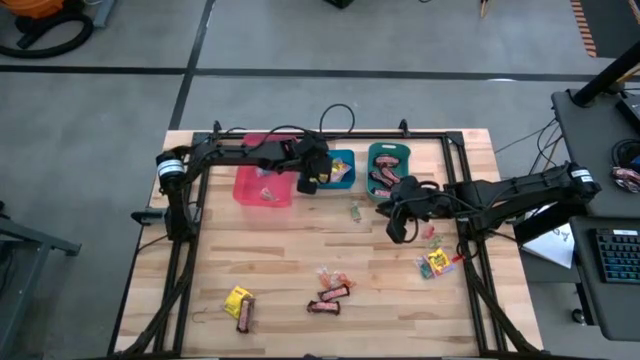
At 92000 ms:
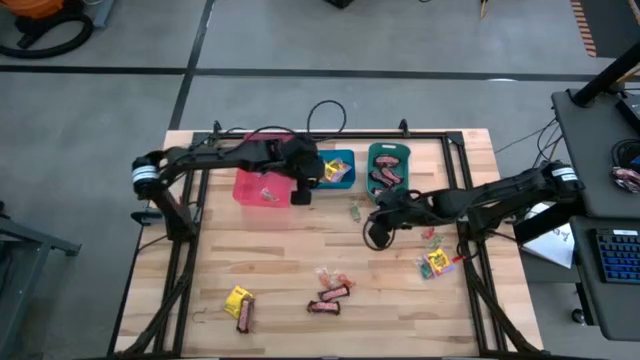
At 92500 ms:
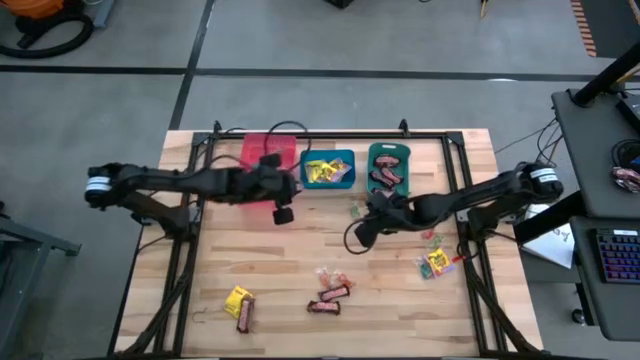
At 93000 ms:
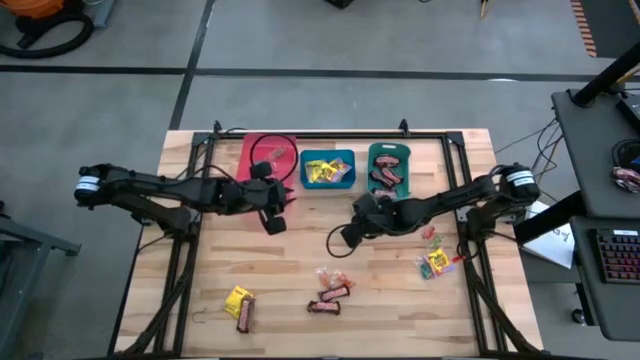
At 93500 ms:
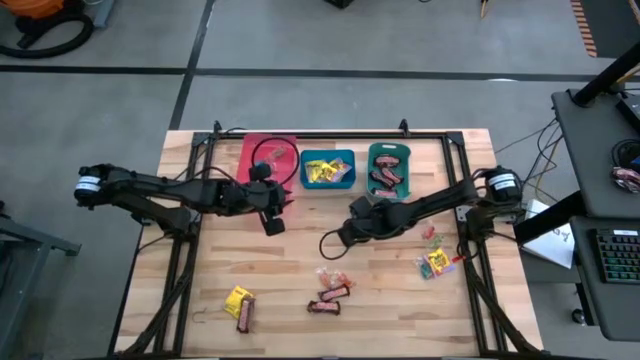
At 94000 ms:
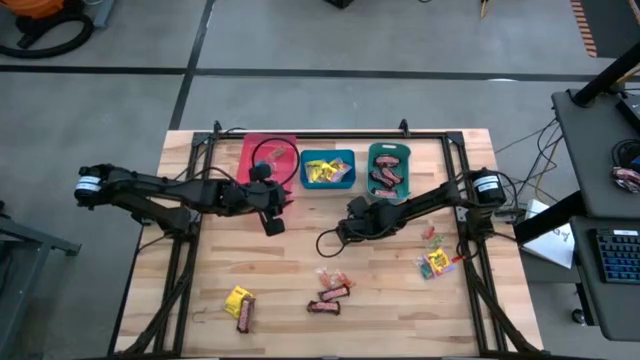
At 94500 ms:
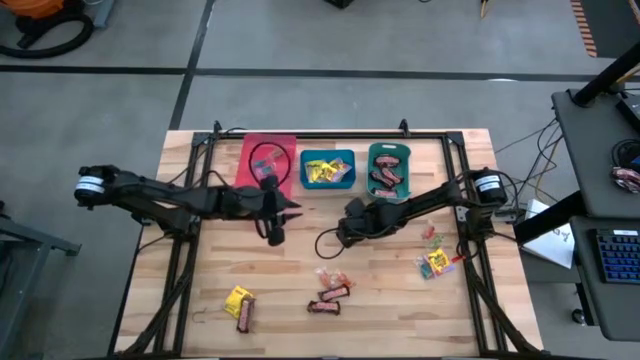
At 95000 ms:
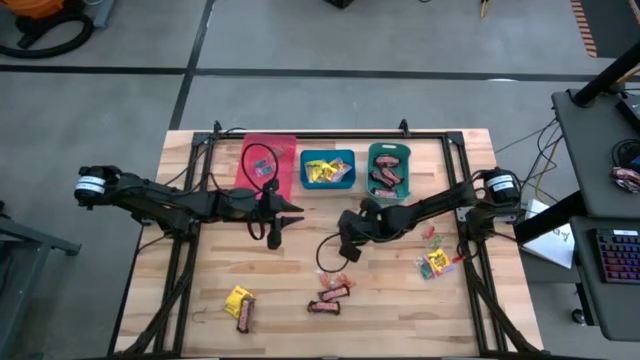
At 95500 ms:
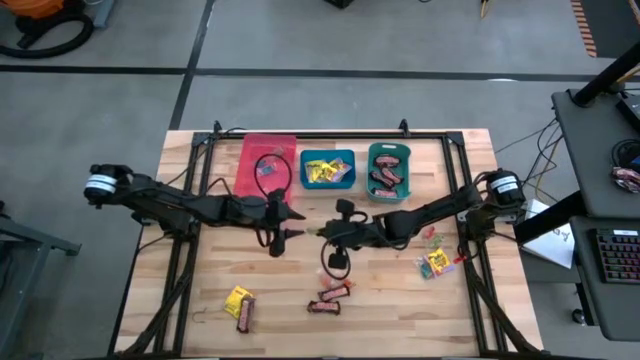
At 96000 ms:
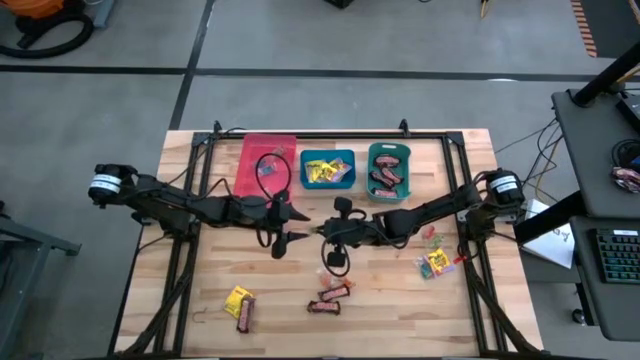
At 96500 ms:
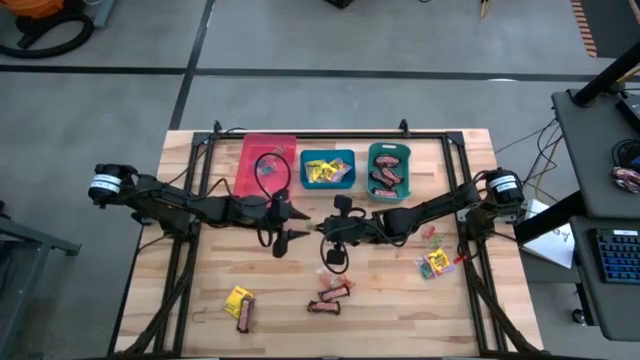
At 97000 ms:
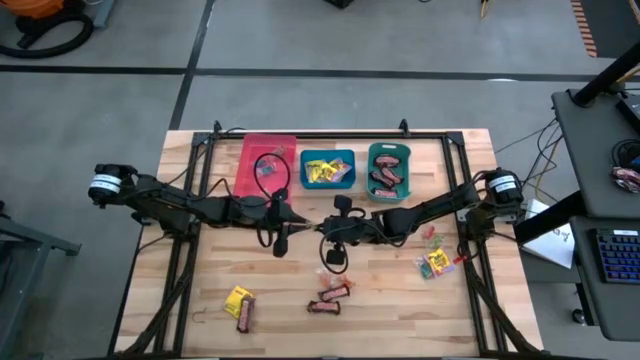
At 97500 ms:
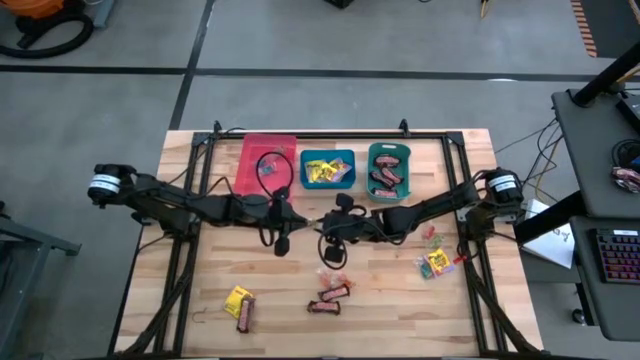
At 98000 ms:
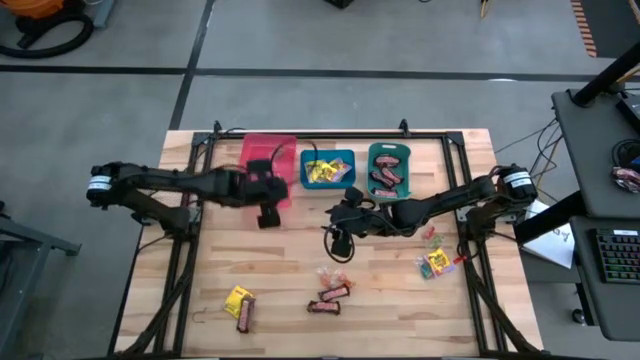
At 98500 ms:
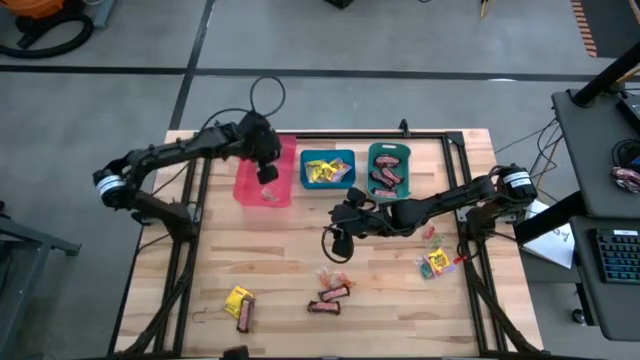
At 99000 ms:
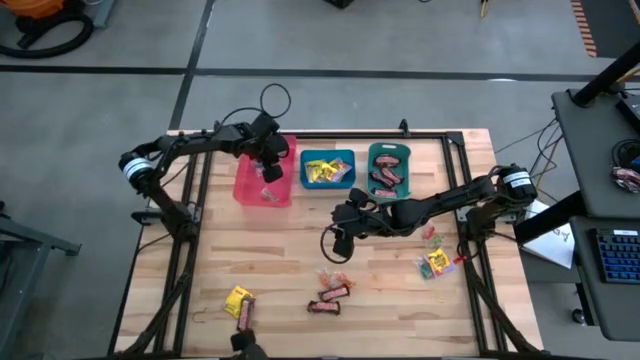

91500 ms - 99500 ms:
Task: Sort candy
Put the top green candy into the red bin

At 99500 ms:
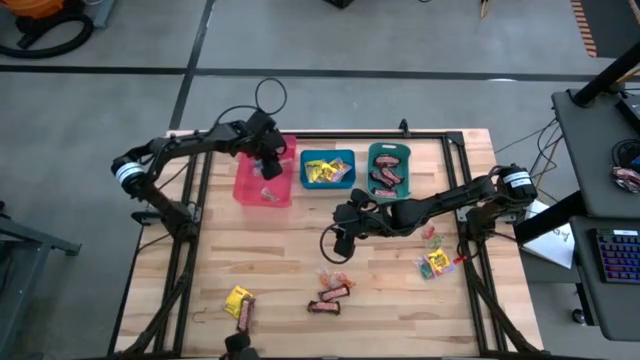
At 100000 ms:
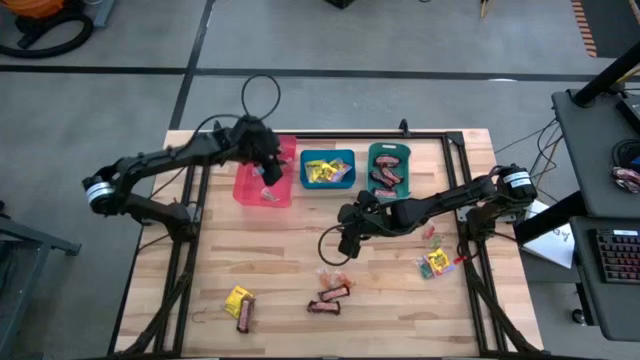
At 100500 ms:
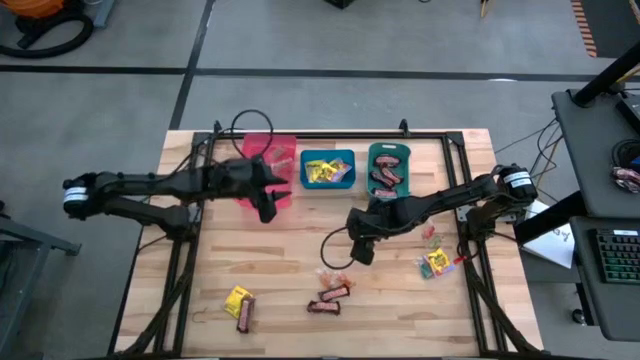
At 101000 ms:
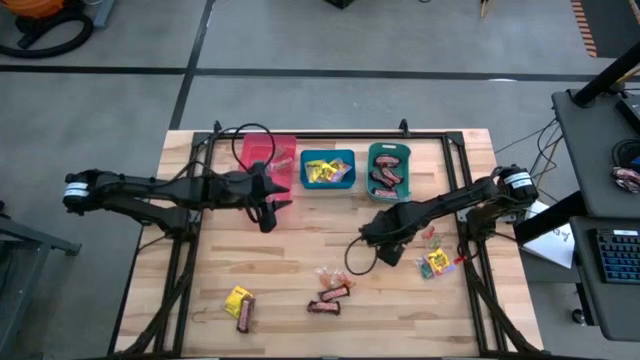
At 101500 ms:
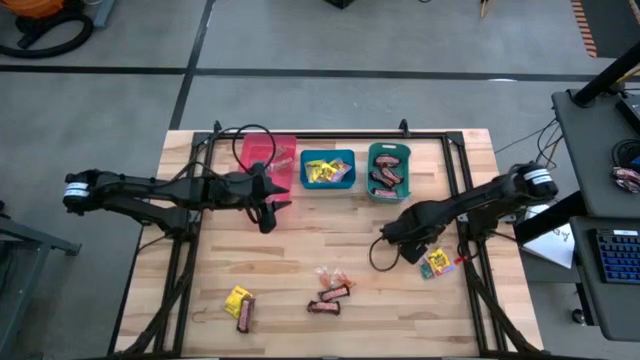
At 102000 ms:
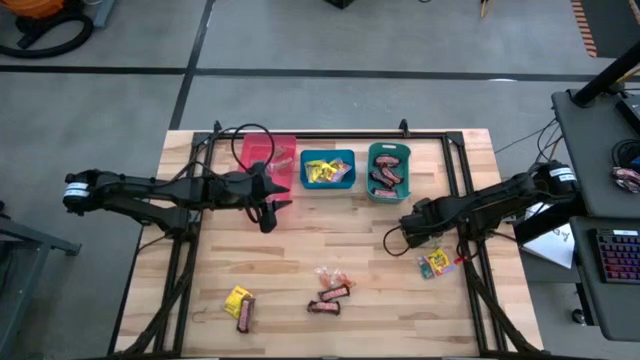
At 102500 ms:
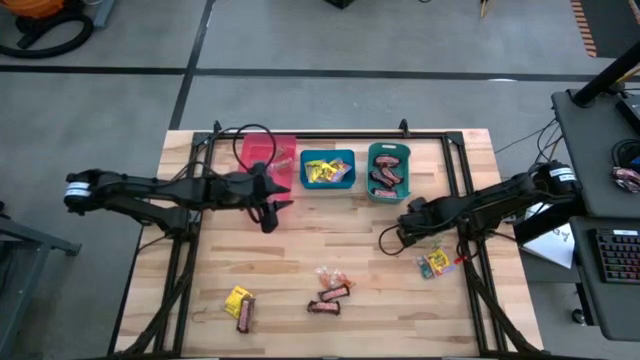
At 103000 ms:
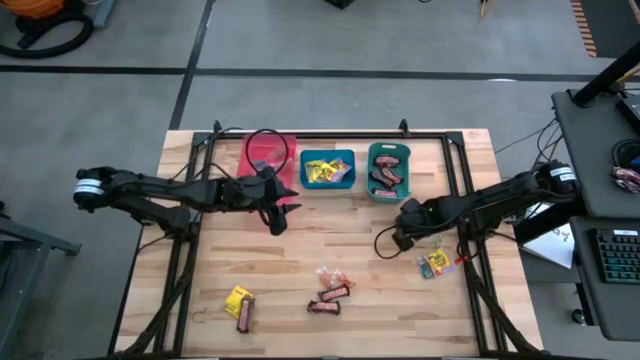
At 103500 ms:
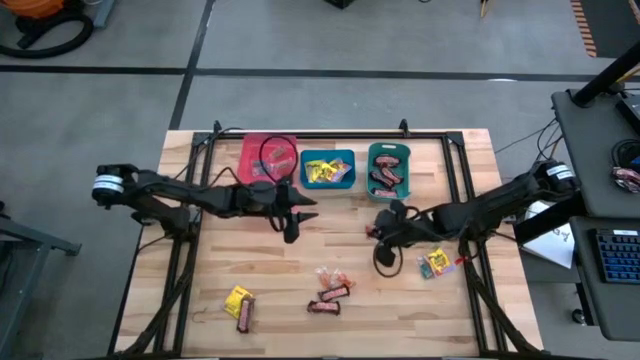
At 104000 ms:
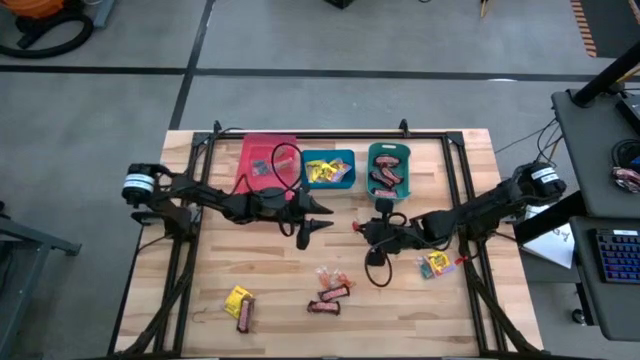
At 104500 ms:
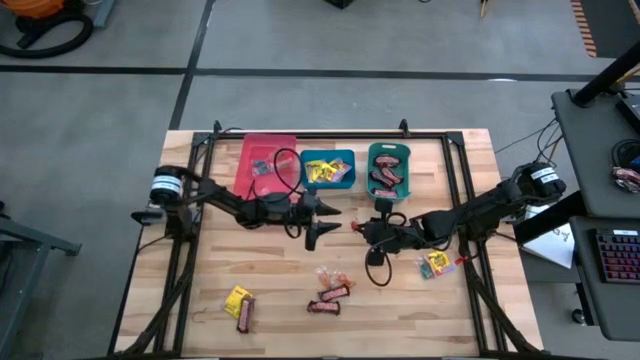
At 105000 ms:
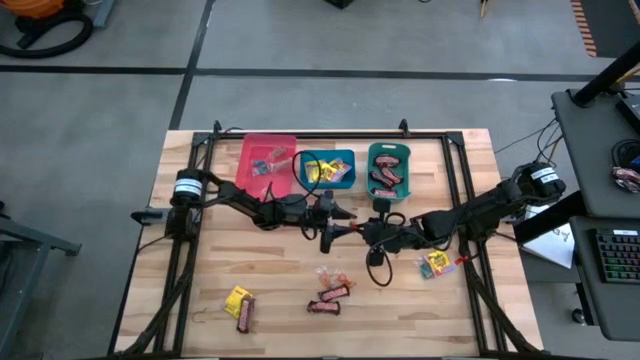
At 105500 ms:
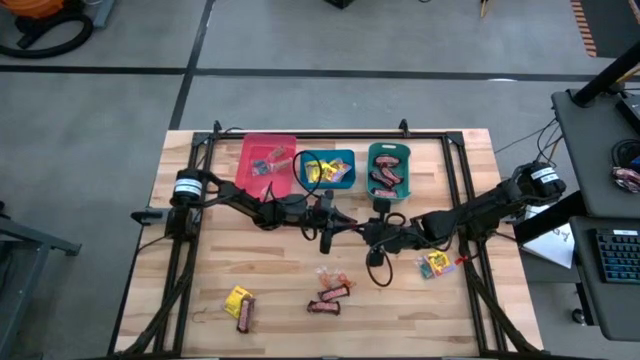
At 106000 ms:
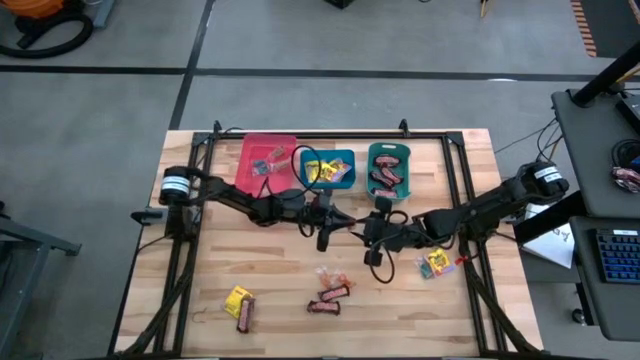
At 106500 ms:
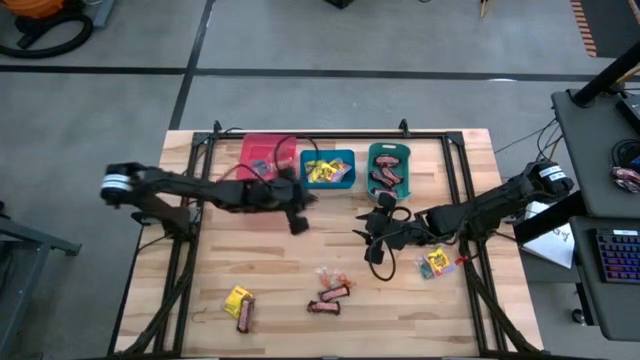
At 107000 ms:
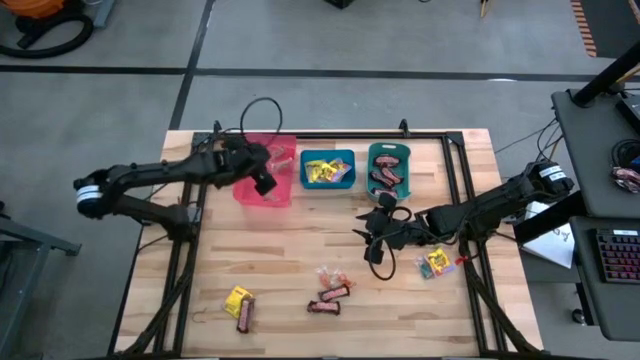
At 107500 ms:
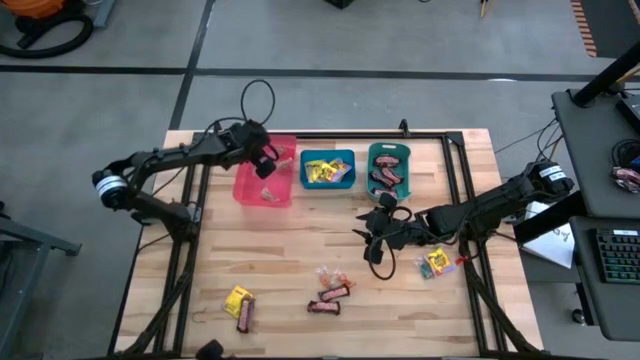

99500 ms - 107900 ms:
Put the red candy into the red bin

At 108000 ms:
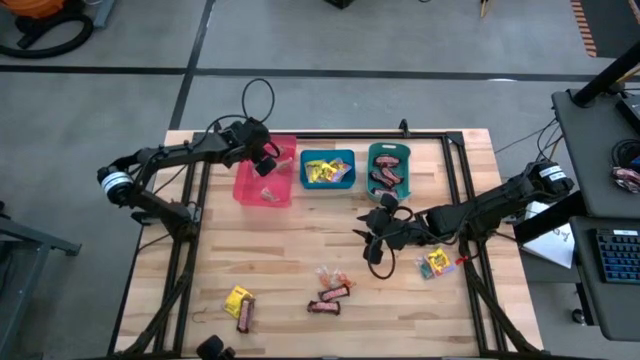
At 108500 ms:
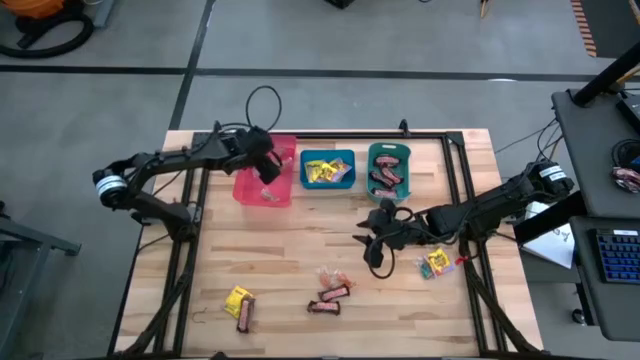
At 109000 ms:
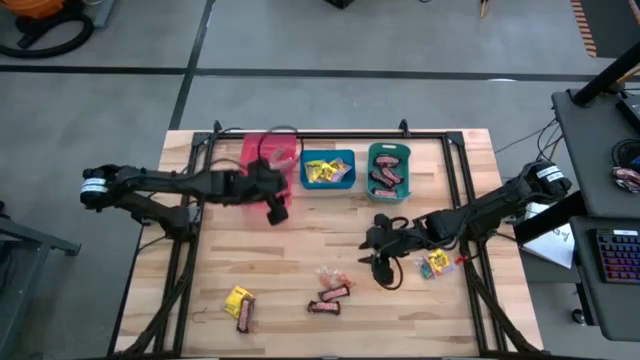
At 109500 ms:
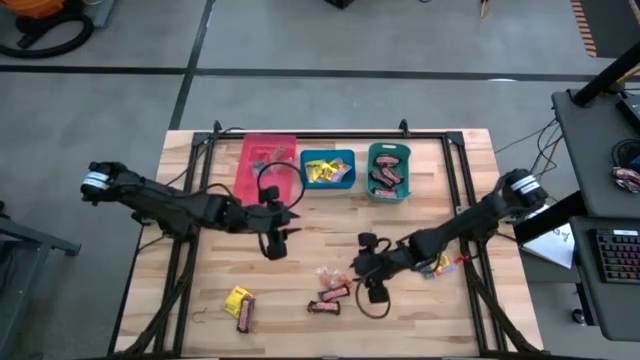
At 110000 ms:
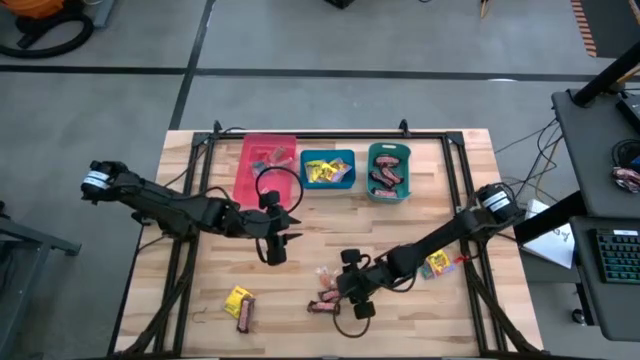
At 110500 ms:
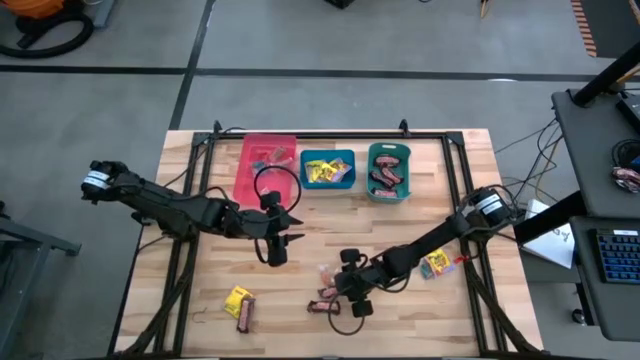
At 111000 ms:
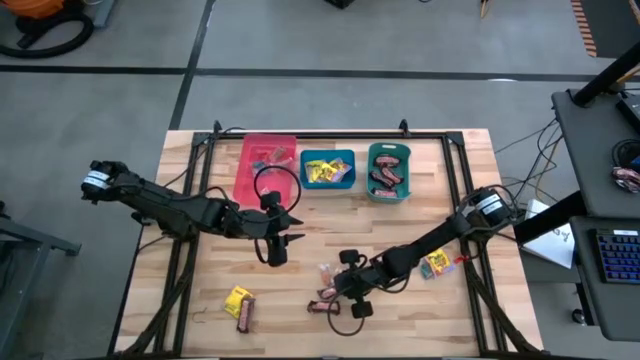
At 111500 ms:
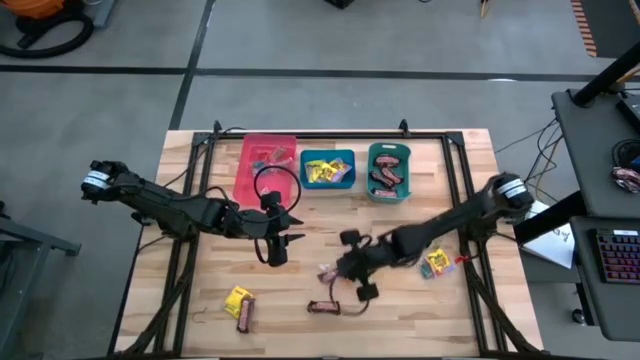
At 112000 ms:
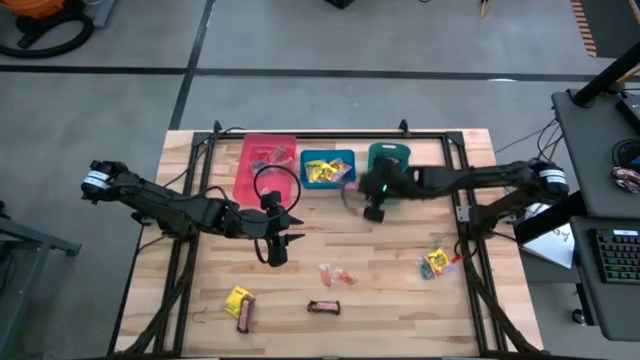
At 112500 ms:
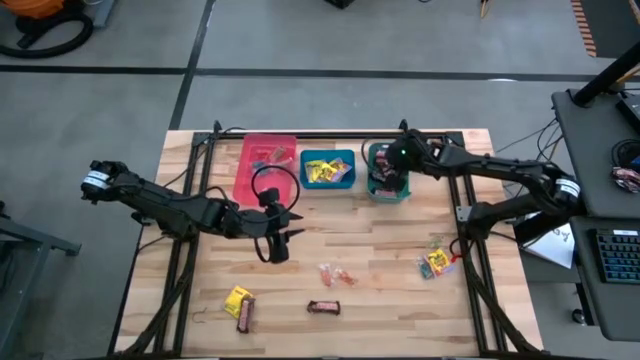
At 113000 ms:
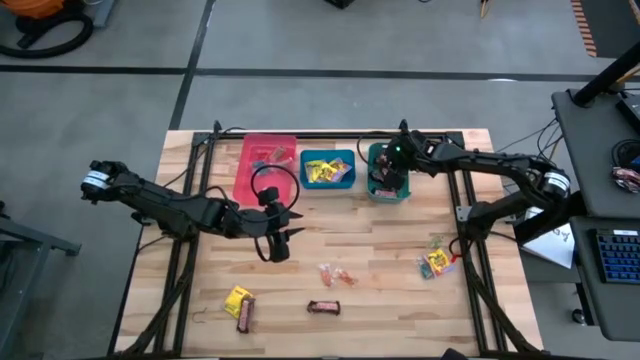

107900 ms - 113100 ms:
Put the brown candy into the green bin
